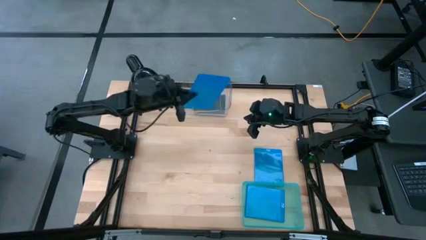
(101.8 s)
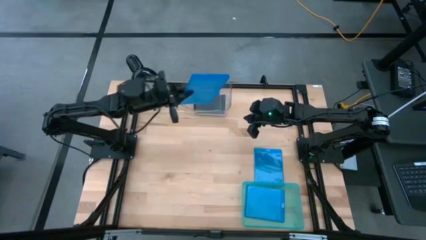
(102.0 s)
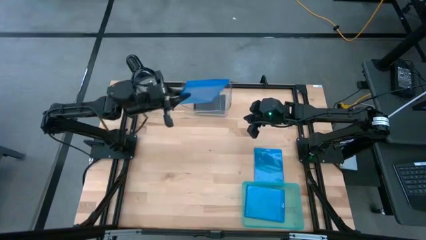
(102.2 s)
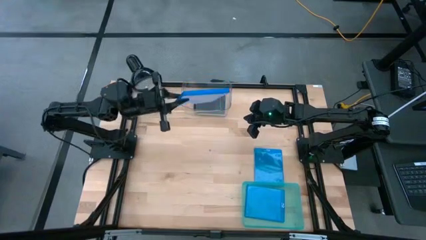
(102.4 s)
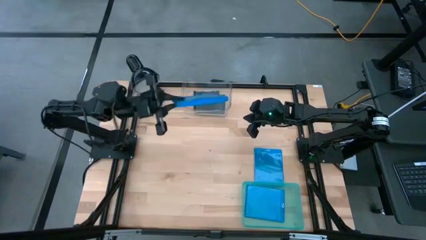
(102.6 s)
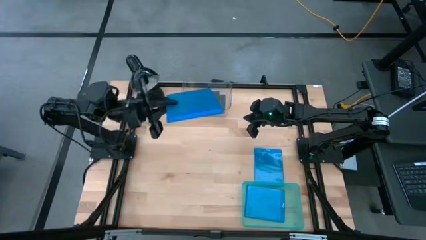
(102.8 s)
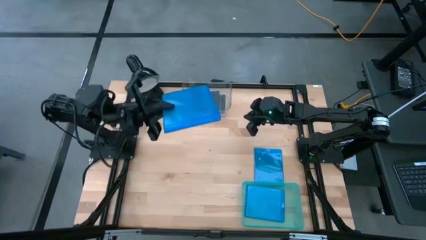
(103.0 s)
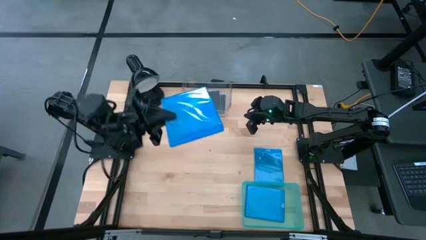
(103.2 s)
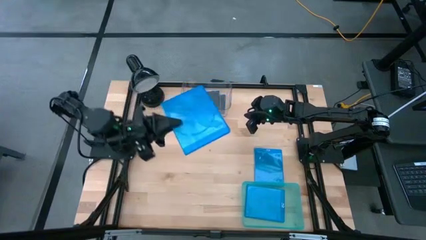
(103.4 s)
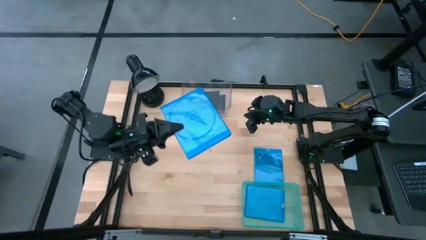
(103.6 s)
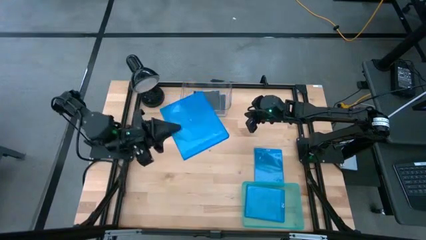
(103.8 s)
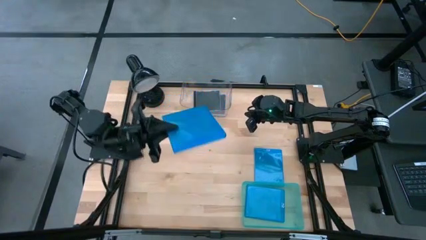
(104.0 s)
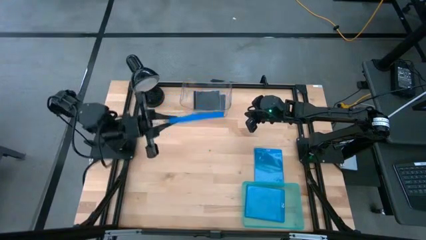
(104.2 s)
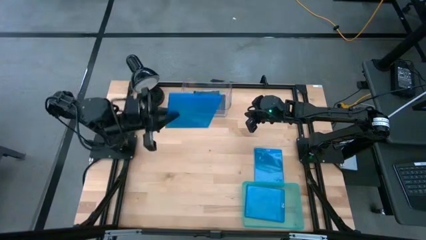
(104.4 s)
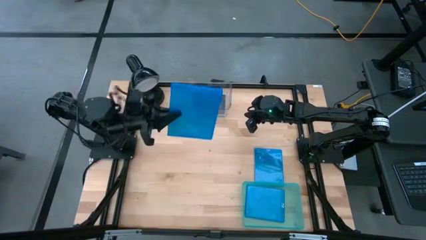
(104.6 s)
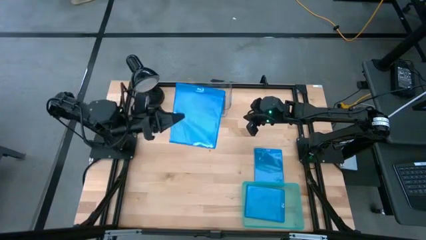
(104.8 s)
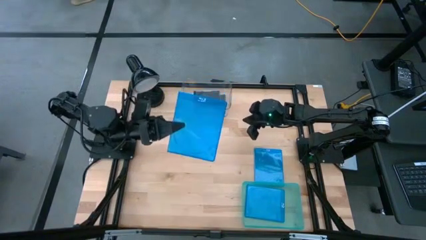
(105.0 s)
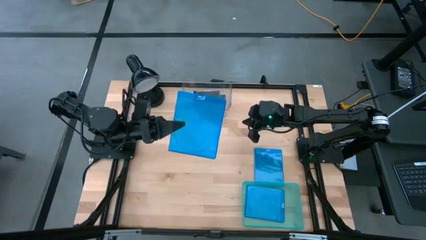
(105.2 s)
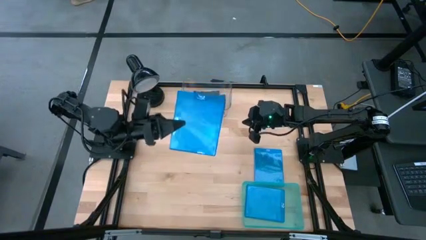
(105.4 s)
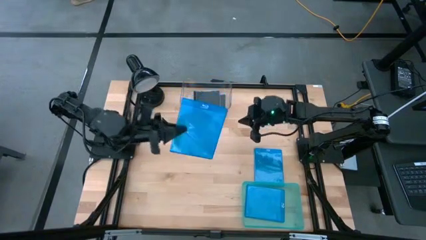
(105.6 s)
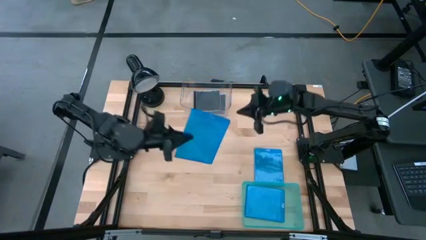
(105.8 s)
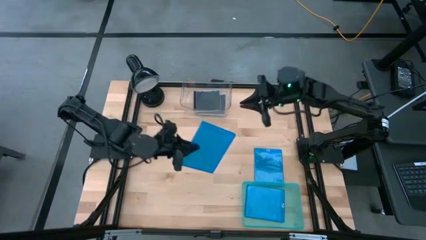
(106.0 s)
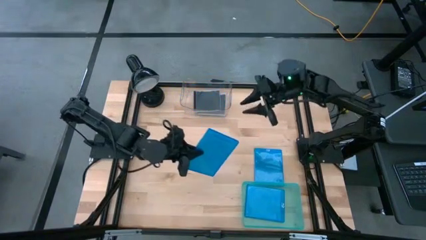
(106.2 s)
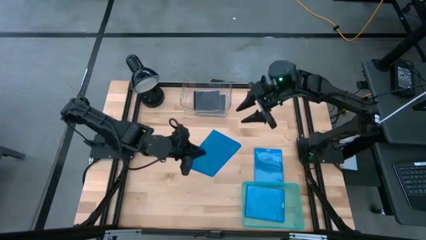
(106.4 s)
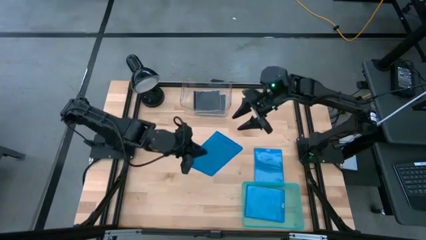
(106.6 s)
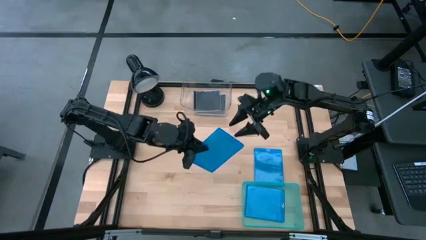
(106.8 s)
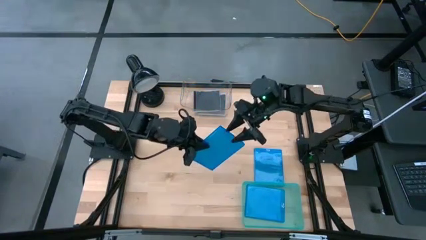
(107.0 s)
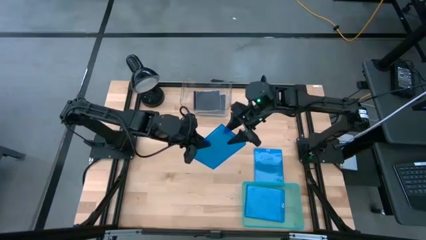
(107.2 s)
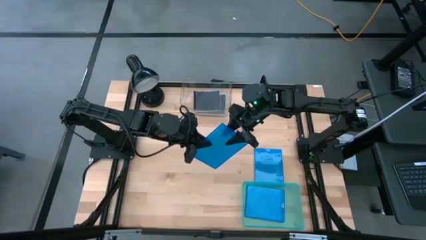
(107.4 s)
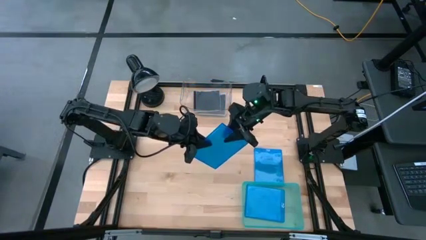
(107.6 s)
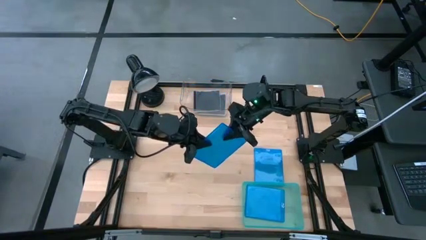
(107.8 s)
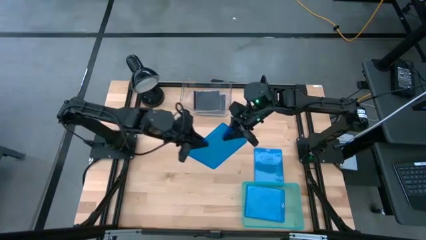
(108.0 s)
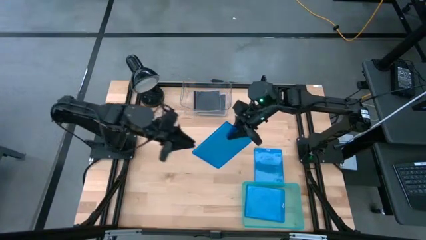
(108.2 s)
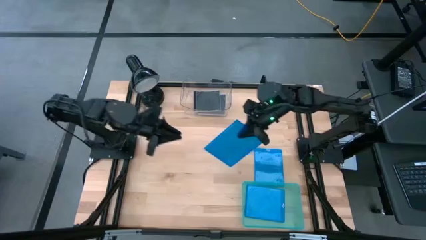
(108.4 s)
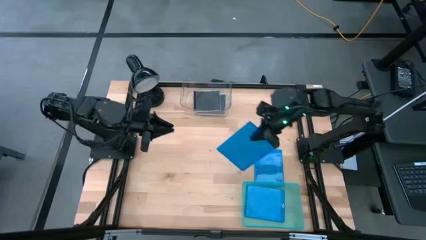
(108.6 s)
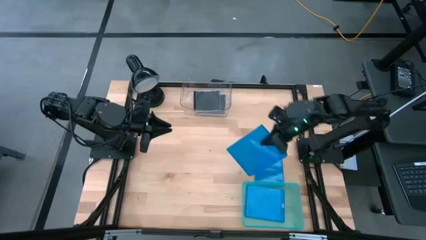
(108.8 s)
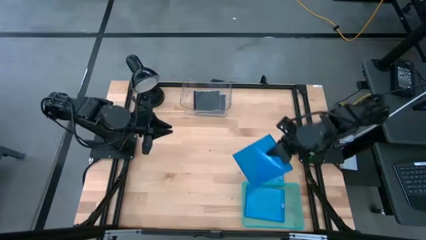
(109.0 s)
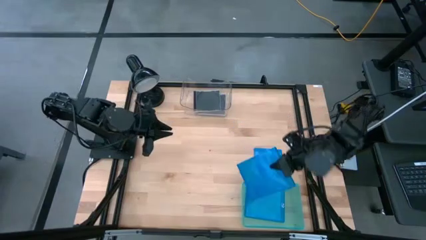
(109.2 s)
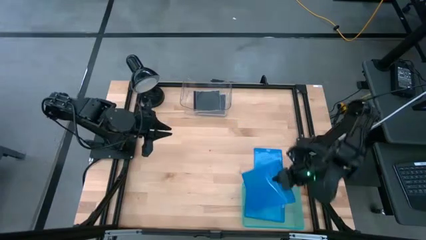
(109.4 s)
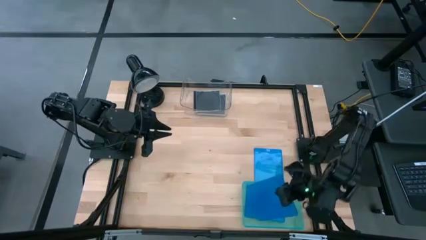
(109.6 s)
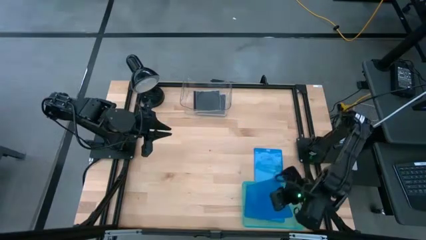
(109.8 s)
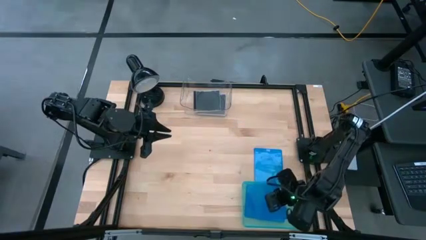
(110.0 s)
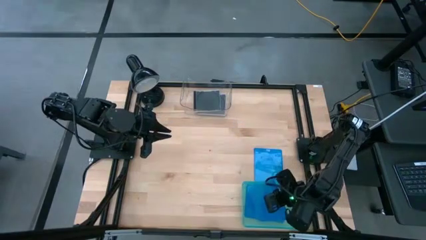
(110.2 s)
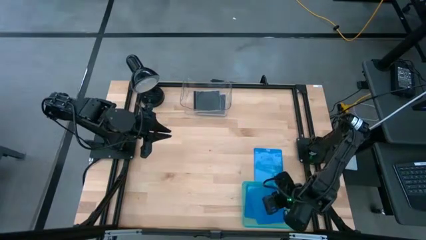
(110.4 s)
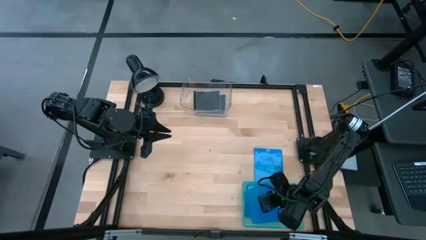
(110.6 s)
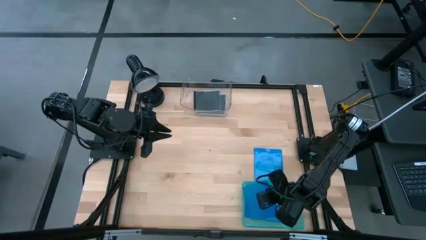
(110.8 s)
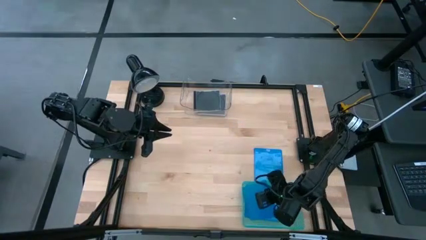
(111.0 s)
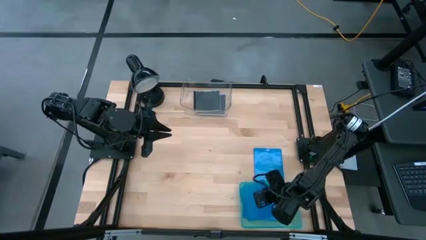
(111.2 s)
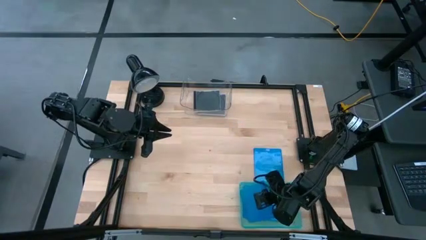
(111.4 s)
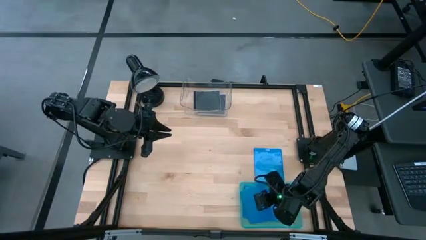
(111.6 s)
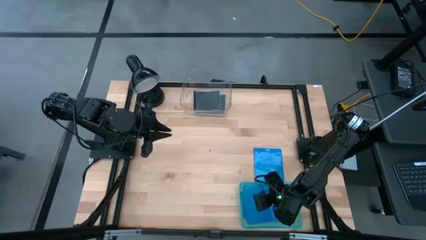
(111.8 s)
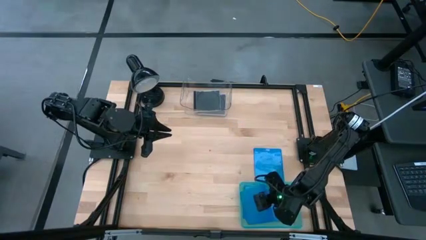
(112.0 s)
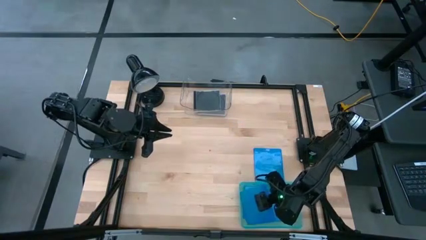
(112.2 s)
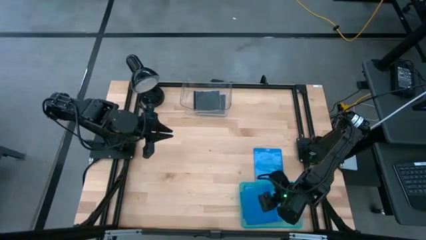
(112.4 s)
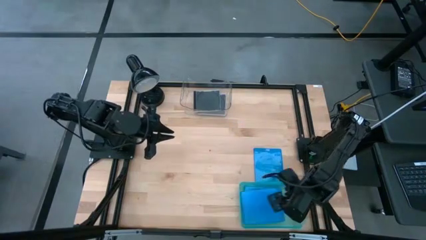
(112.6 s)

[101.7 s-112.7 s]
Task: Pick & place jewel cases by type
Put the top blue cd case into the green bin

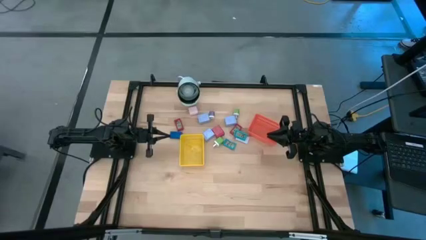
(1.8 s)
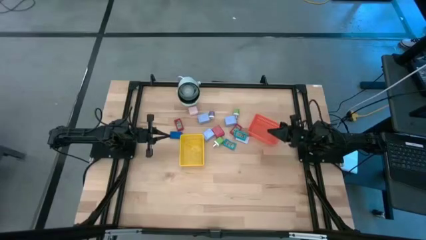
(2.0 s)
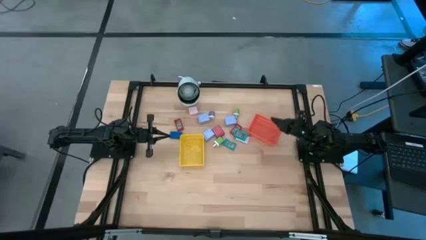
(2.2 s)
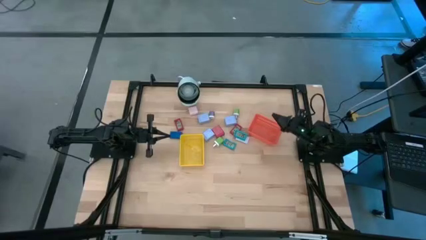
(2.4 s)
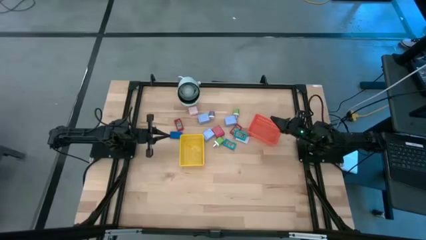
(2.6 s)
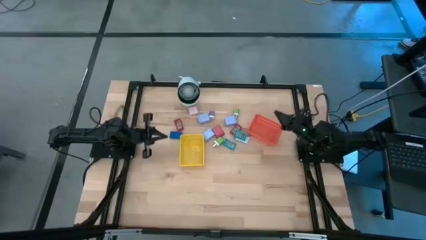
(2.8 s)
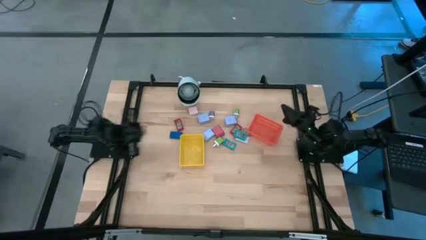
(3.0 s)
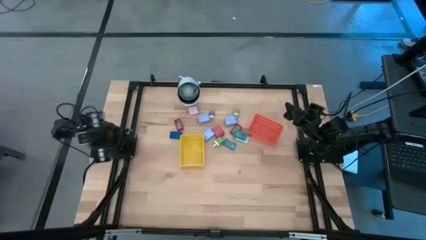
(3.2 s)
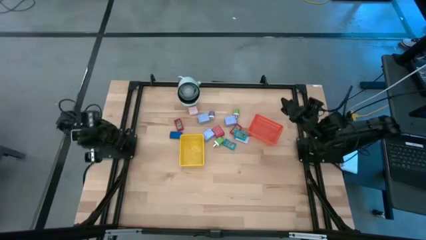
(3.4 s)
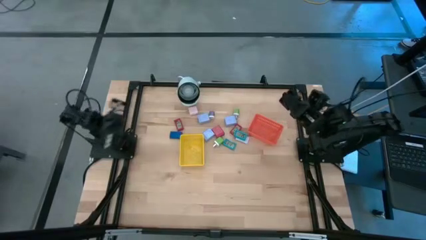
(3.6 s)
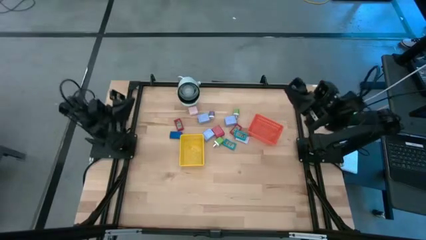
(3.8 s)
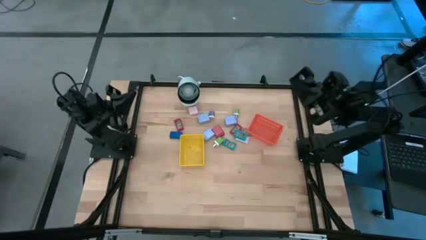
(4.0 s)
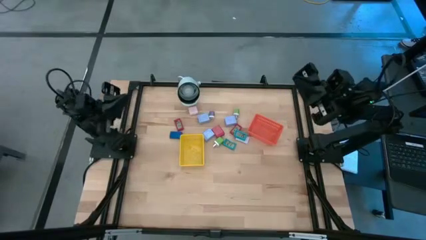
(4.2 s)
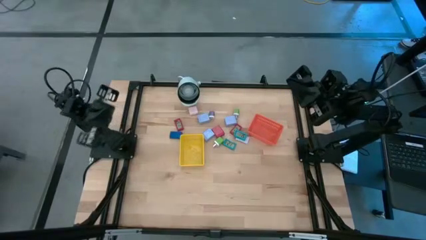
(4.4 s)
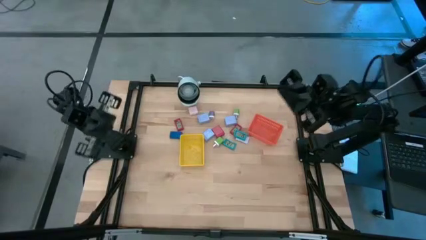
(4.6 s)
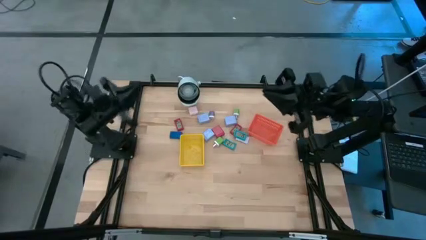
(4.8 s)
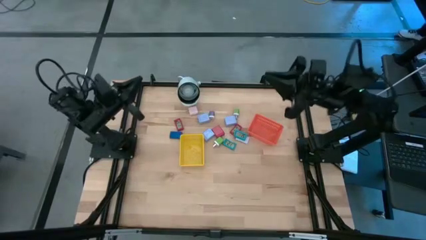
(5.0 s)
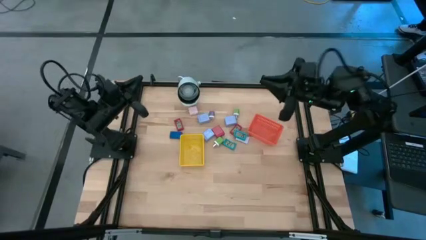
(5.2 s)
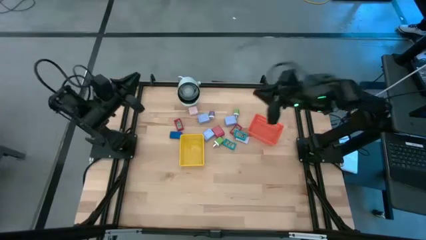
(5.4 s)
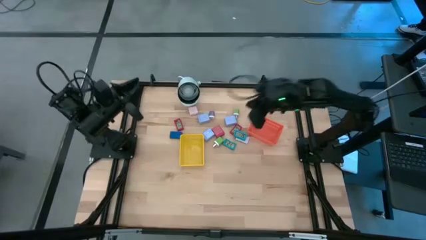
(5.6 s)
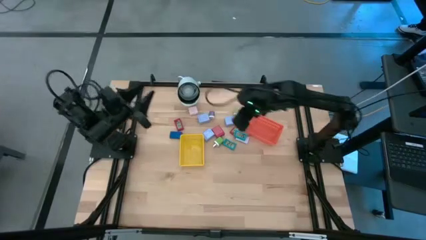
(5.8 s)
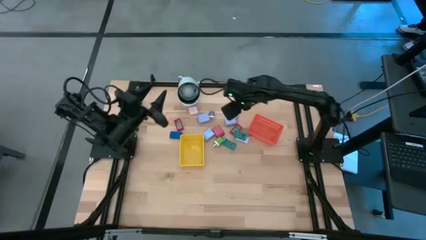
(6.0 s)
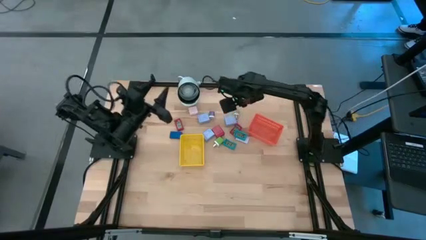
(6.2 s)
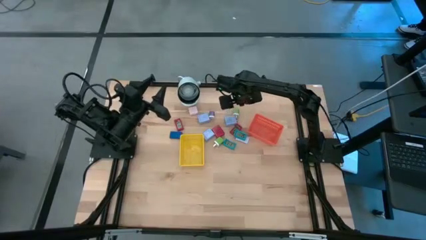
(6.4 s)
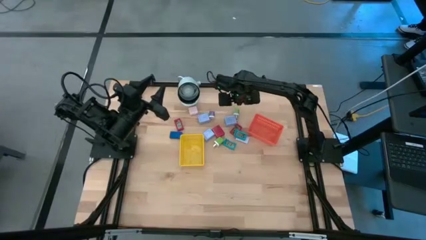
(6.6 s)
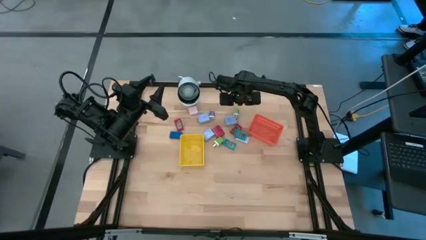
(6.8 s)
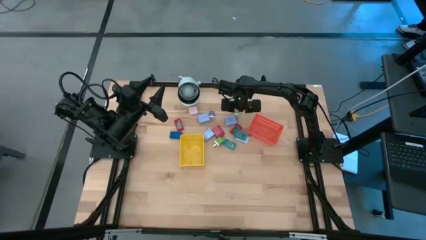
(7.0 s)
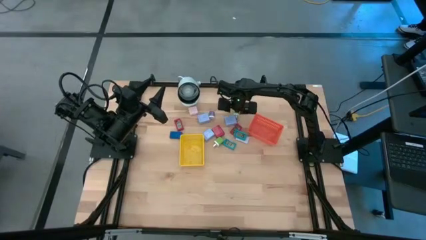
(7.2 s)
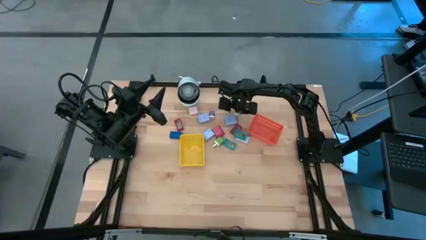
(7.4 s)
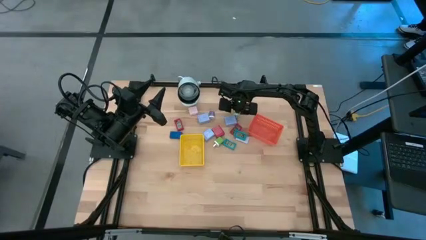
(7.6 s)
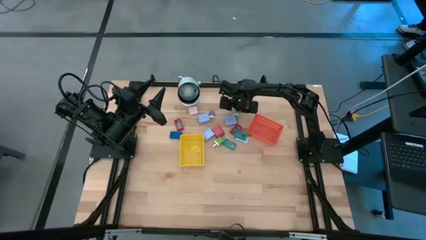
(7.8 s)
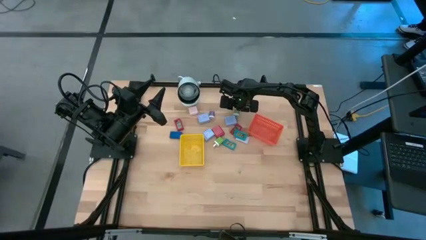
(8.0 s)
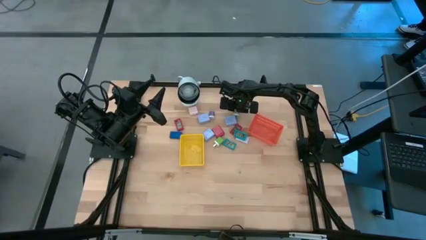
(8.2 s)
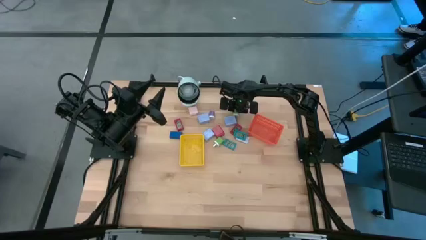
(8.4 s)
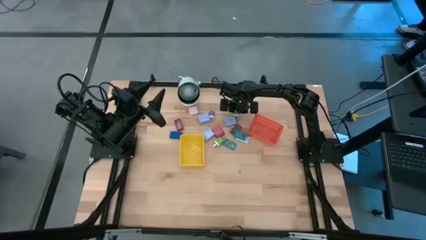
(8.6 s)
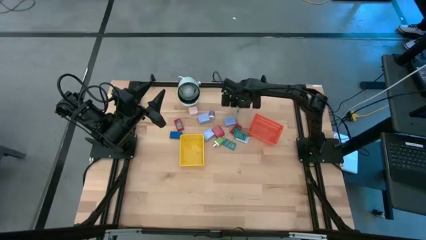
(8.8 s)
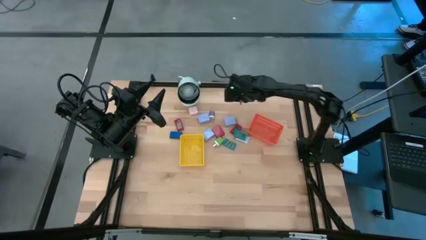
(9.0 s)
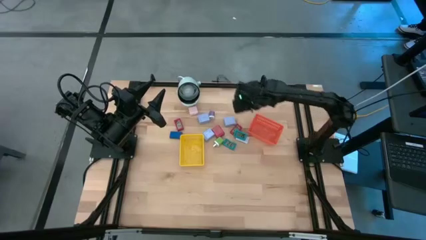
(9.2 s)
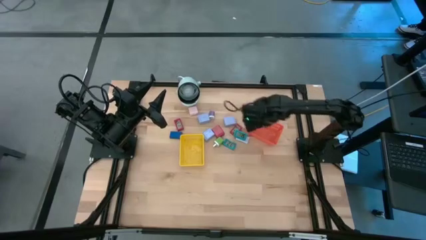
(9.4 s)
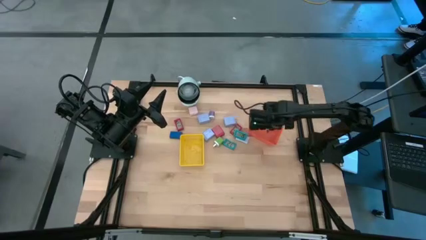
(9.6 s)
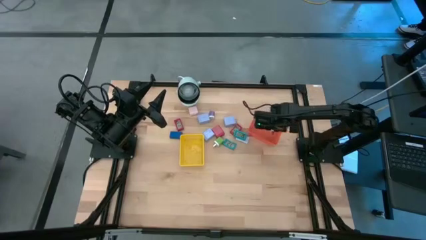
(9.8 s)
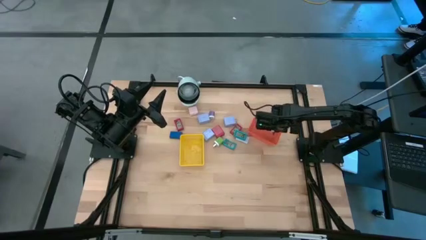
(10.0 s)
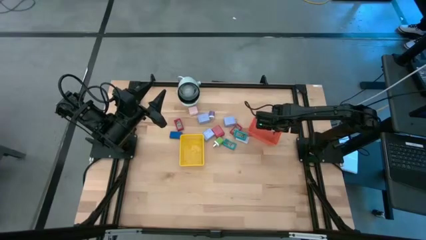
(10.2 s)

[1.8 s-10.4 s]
Task: Pick & Place Office items
Put the top green charger adapter into the orange basket
